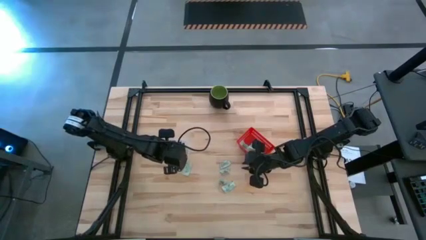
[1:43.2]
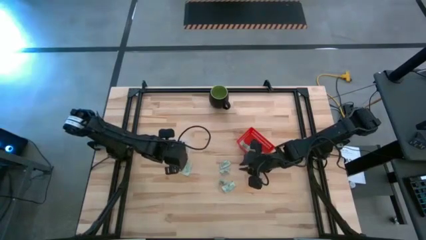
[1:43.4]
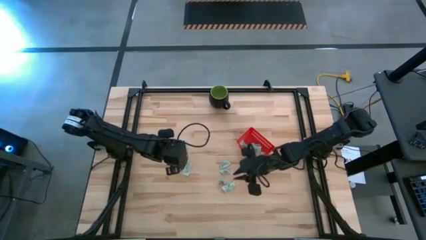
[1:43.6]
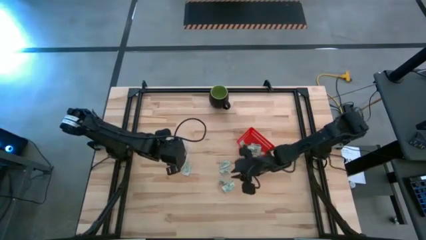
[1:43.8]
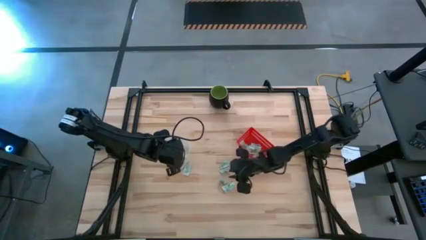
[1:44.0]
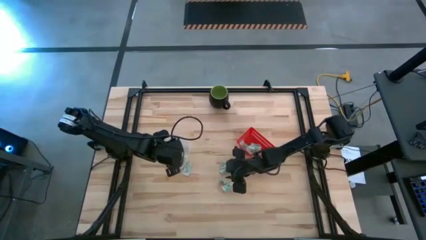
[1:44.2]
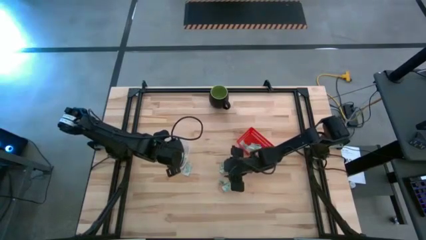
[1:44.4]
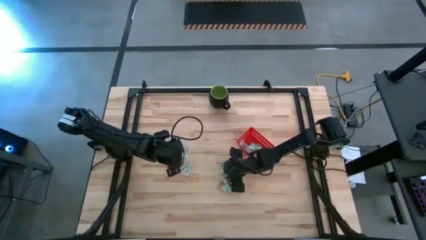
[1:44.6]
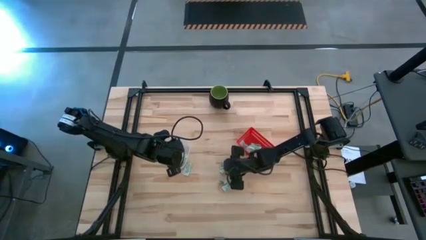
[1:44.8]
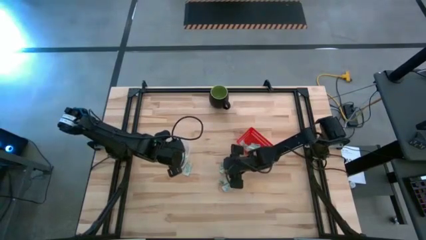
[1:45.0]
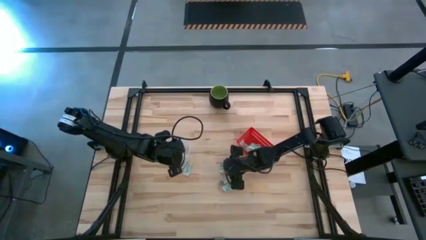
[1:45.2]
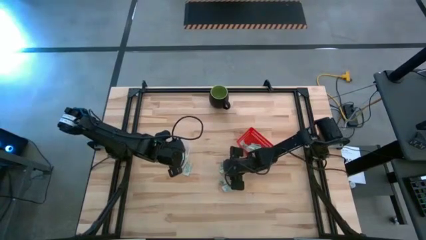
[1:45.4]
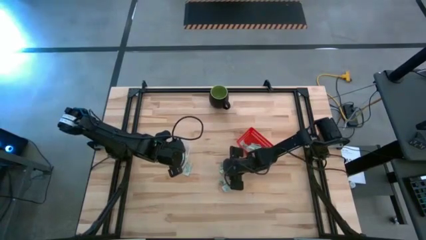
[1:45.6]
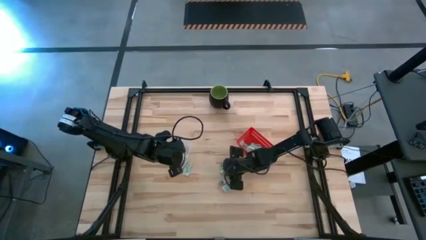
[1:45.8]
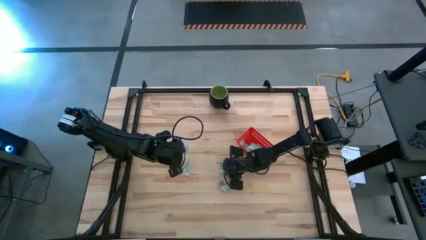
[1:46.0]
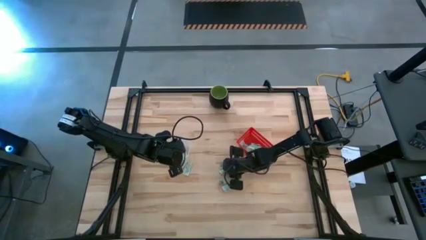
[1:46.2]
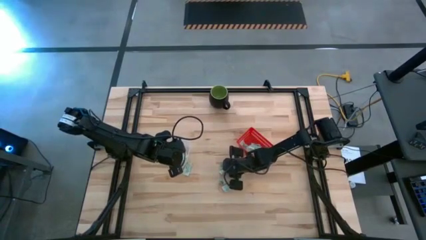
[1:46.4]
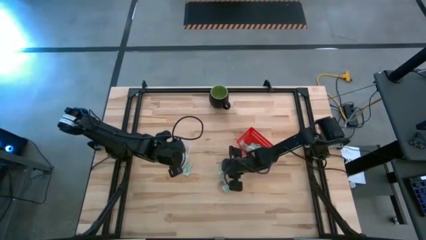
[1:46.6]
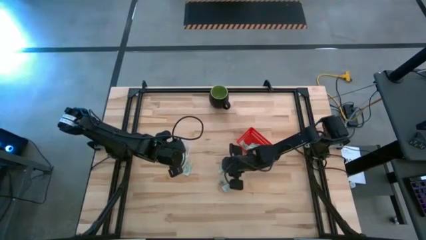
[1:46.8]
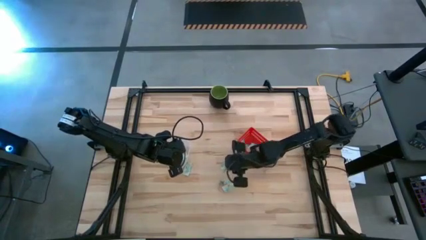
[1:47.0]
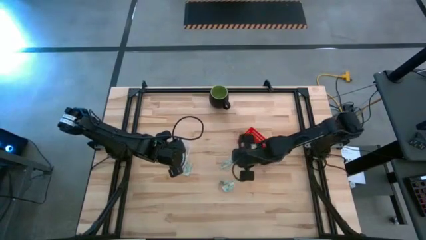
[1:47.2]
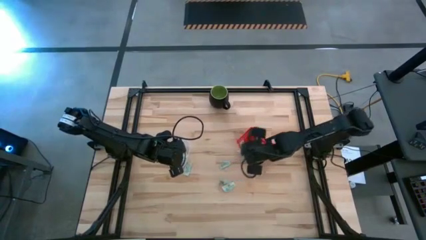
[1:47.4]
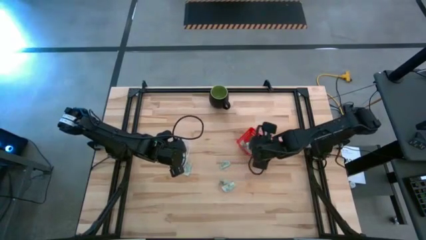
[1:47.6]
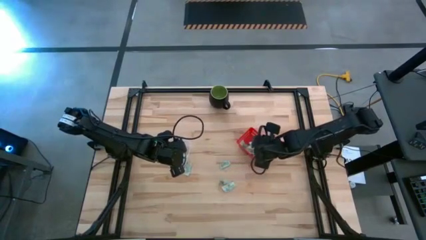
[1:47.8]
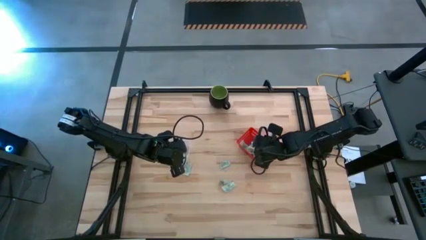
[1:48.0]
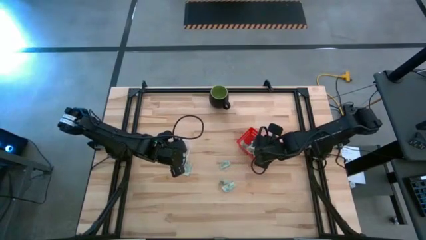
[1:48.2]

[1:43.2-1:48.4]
Task: Pick and place items into bin
Put the stevia packet into the red basket

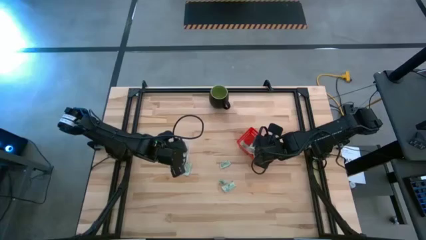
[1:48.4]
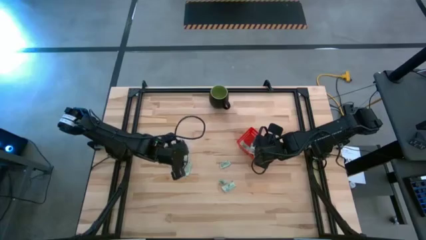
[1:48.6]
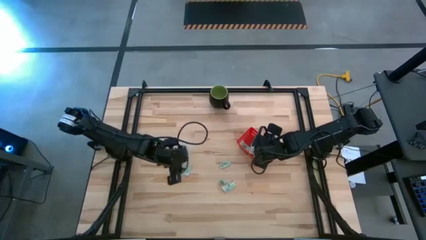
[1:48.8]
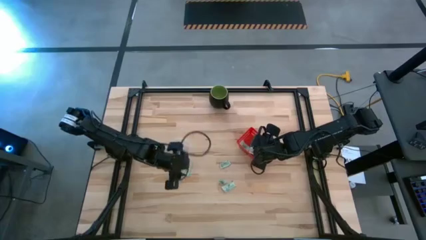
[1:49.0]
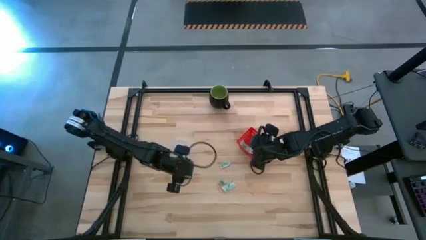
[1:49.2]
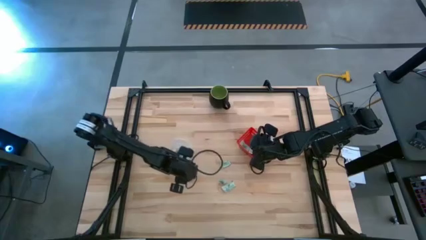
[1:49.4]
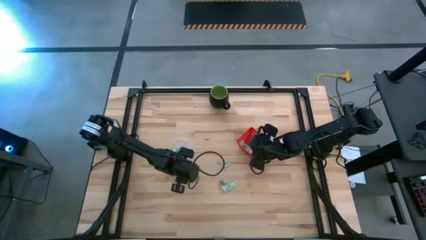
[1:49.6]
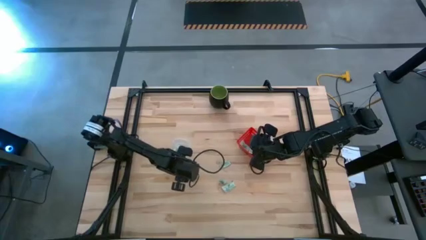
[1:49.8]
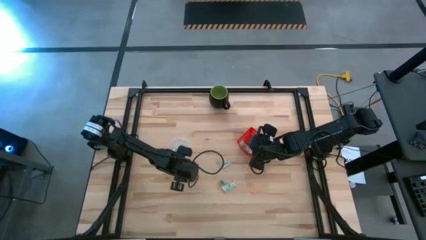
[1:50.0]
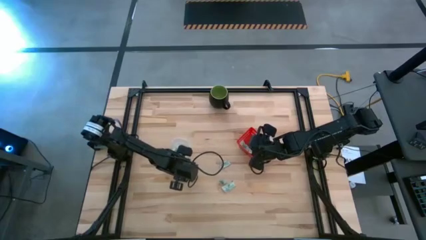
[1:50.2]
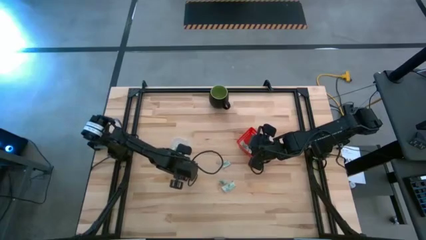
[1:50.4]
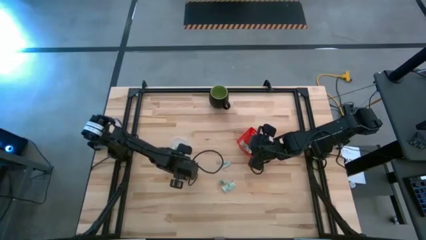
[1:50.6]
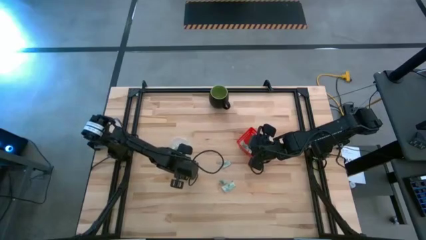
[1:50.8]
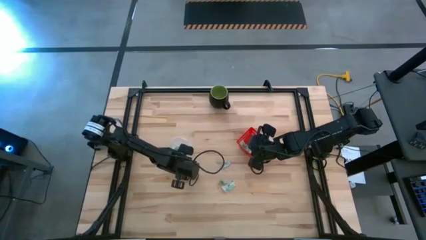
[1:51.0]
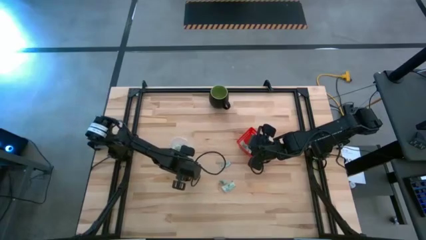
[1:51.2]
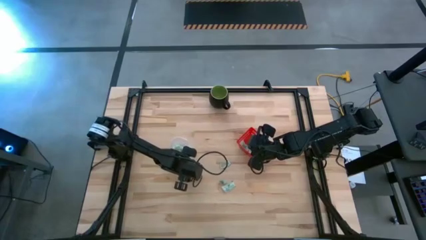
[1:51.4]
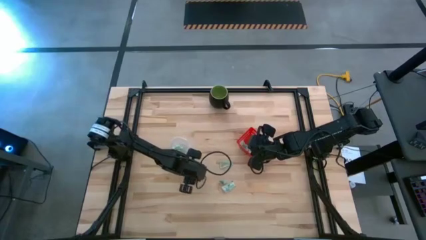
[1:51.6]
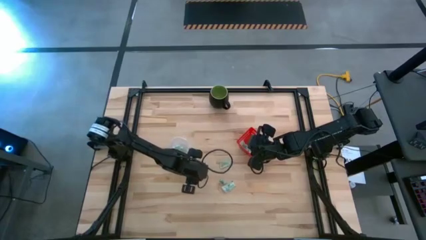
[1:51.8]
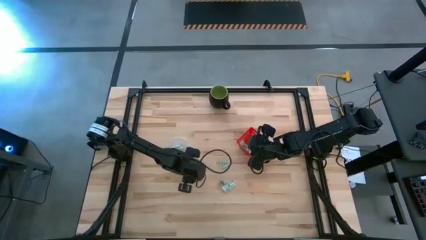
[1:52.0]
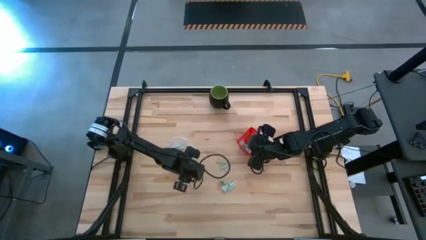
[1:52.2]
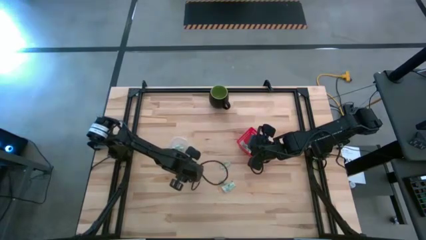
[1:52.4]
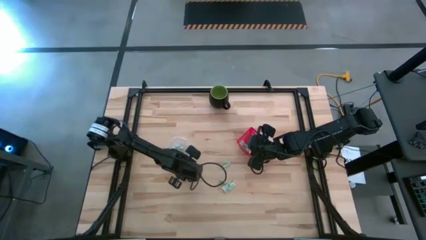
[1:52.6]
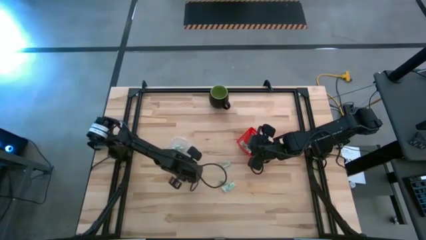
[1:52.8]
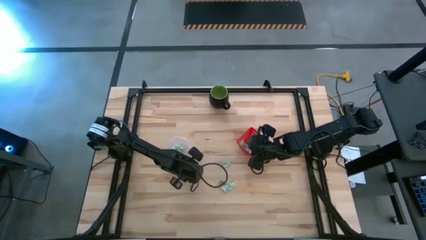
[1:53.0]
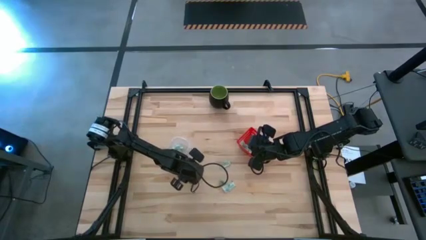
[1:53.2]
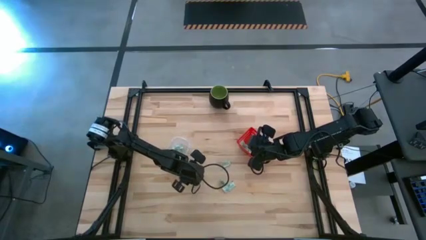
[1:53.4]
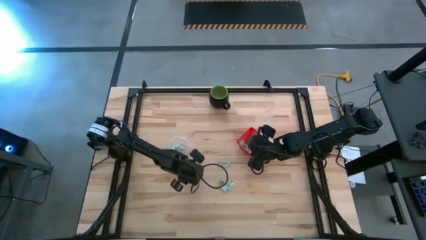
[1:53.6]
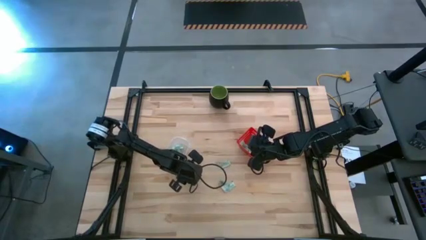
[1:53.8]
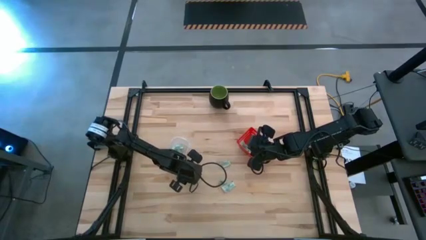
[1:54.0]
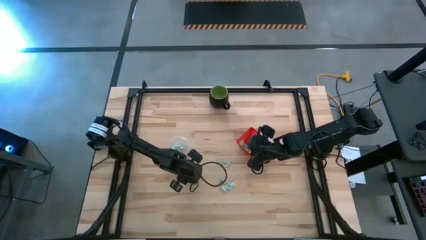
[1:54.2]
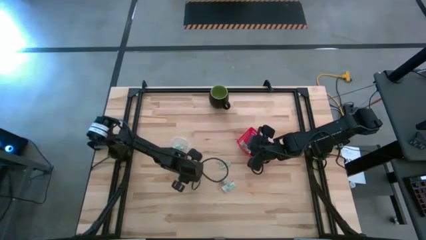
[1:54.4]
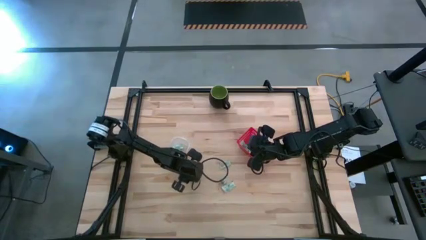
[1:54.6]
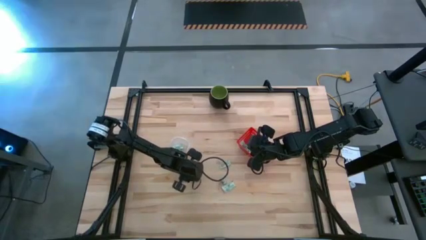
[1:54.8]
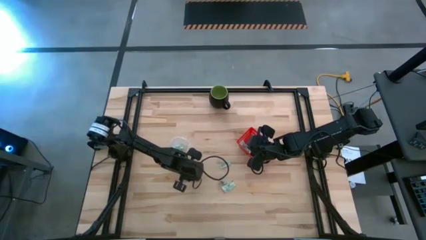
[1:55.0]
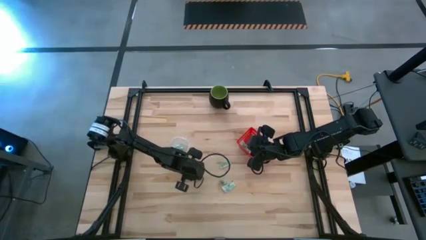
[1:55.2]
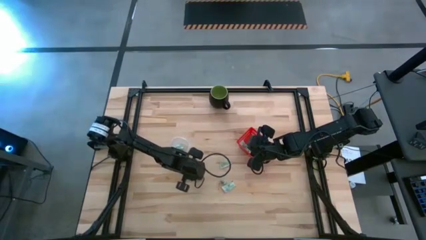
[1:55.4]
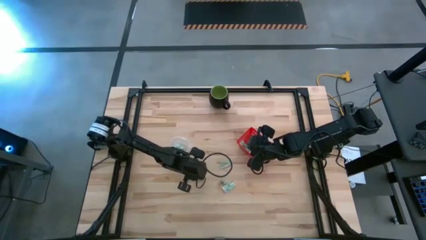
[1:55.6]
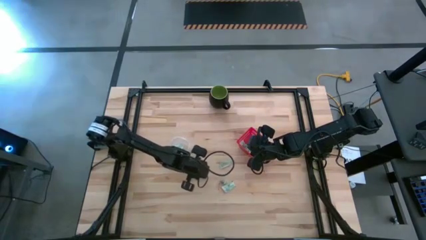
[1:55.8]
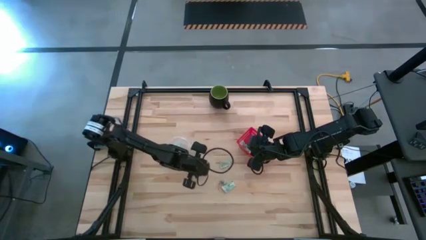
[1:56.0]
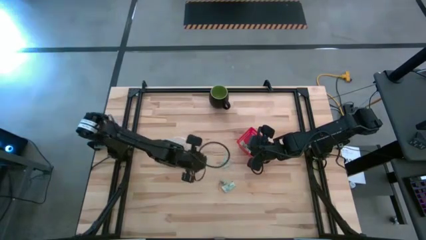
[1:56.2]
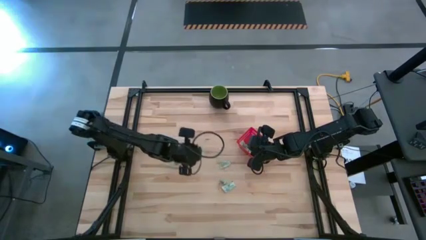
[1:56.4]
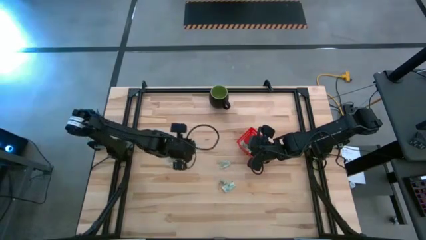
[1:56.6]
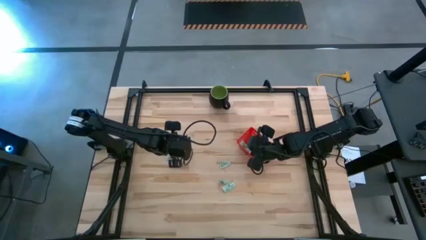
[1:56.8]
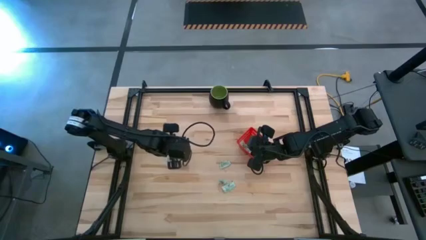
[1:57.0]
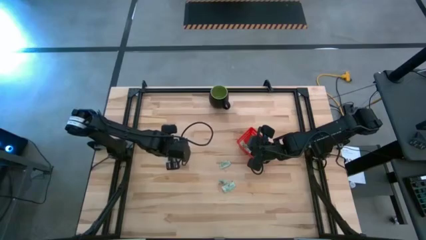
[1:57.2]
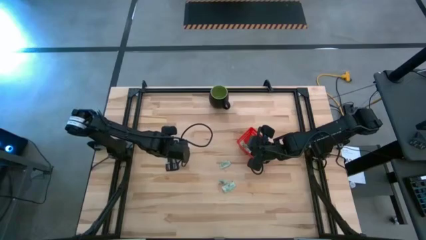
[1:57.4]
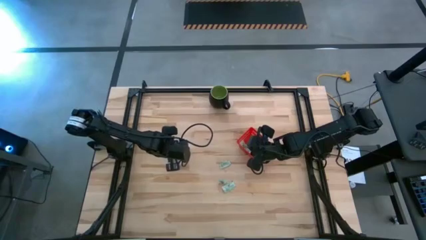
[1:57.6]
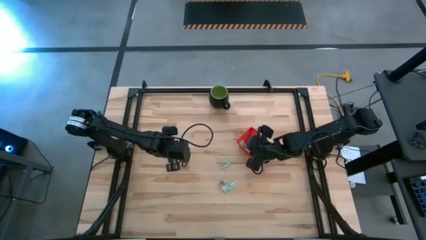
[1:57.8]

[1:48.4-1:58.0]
Put the stevia packet into the transparent bin

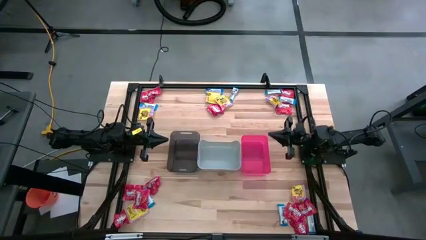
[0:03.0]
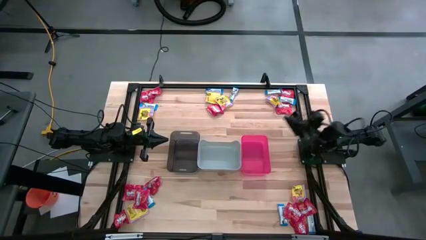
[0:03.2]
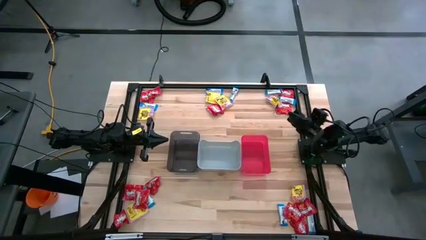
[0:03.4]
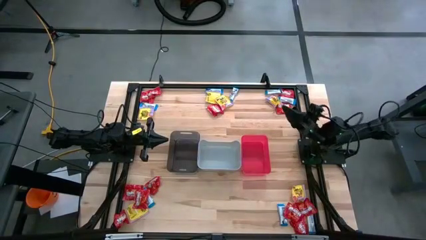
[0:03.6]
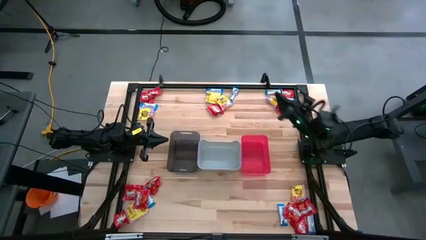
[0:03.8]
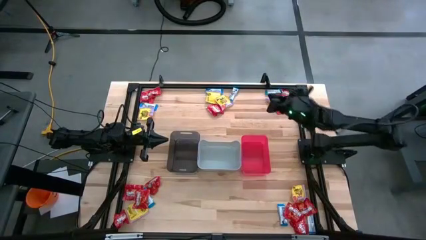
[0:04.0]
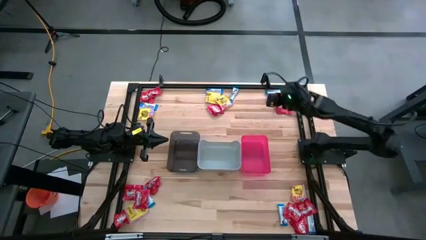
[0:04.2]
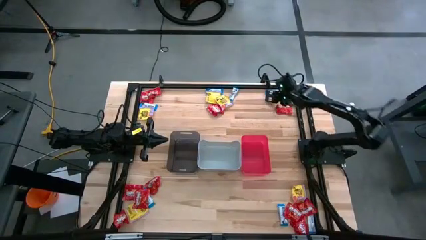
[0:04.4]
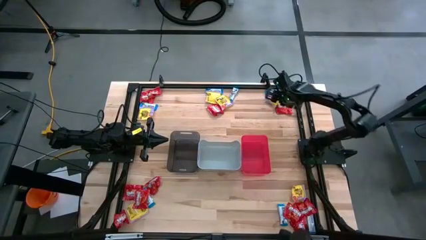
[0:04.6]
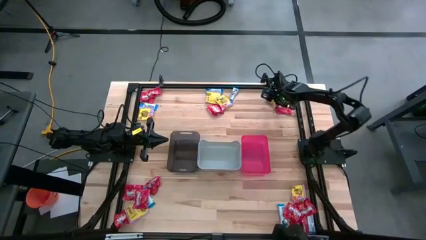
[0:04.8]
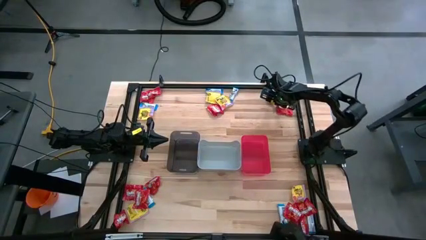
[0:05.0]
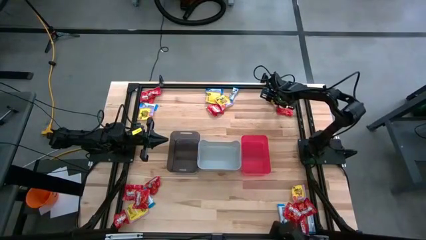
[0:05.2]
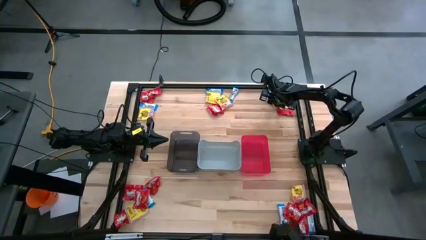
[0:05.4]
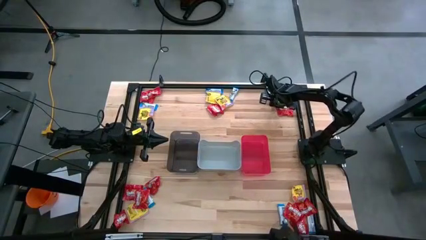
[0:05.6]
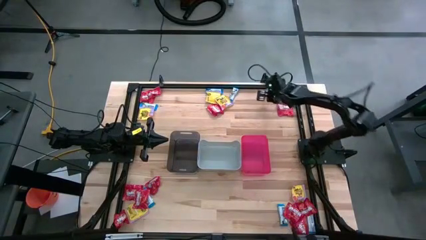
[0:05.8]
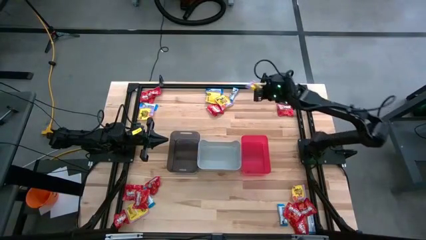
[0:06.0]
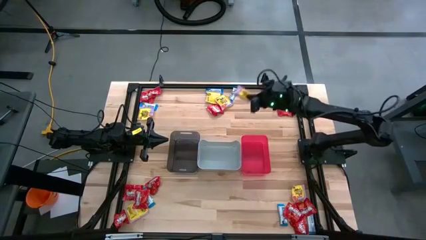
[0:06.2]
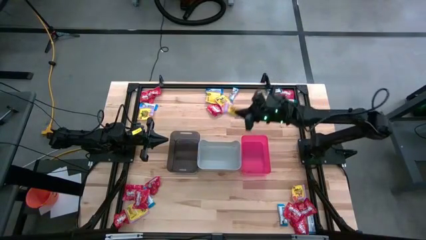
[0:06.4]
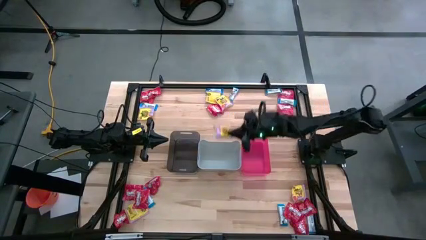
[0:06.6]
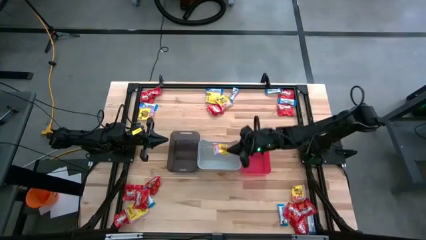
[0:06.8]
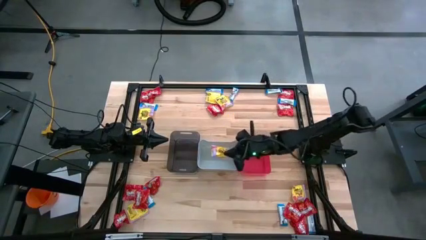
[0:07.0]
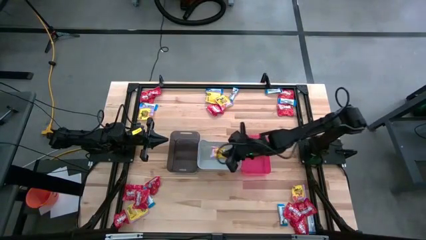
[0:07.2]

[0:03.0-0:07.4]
Task: Sort candy
Put the yellow candy into the gray bin
